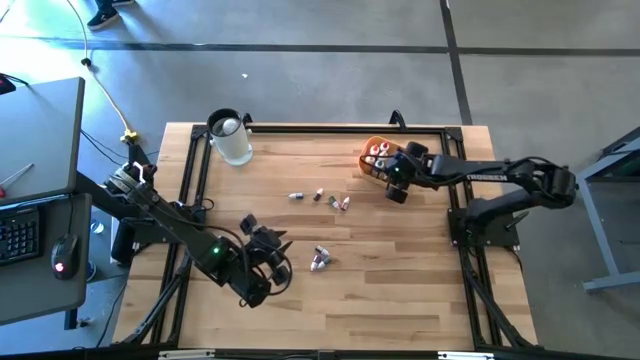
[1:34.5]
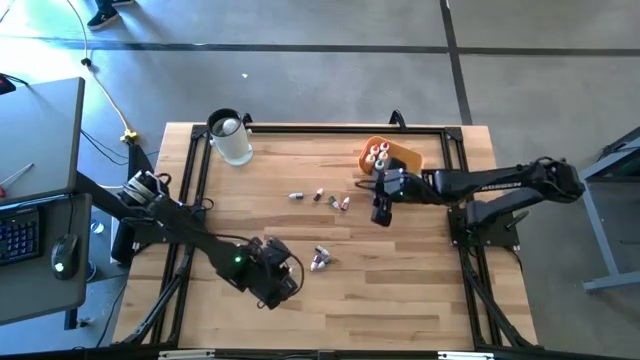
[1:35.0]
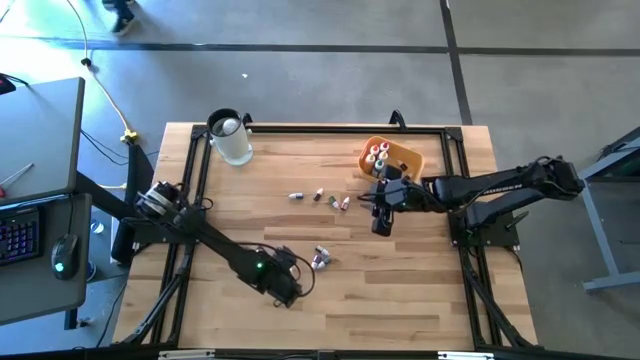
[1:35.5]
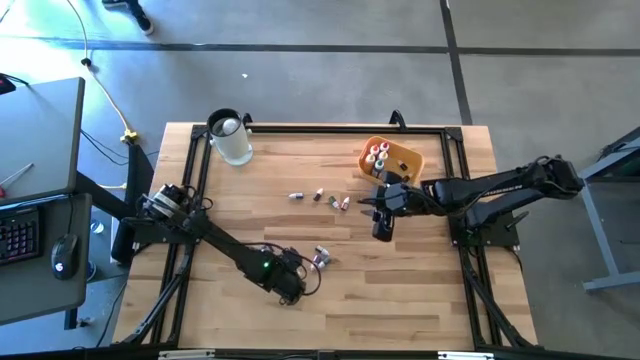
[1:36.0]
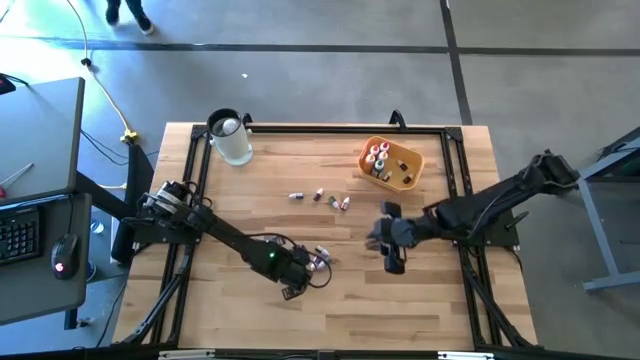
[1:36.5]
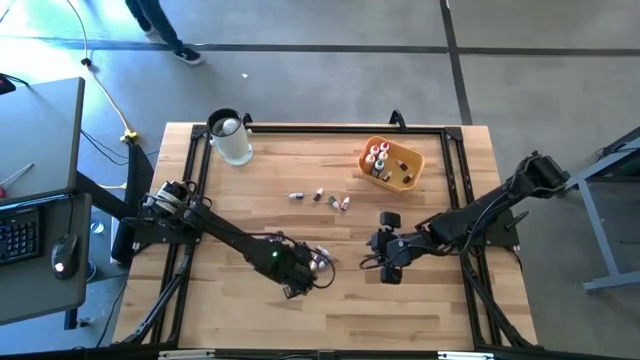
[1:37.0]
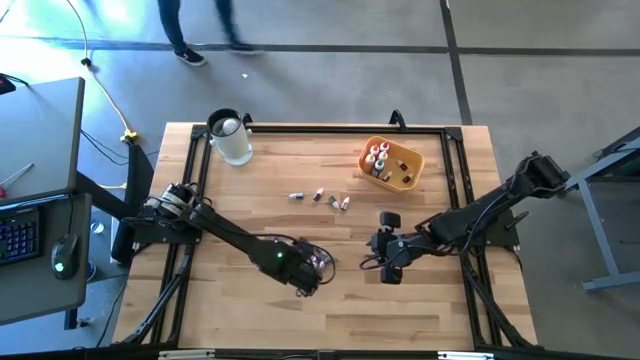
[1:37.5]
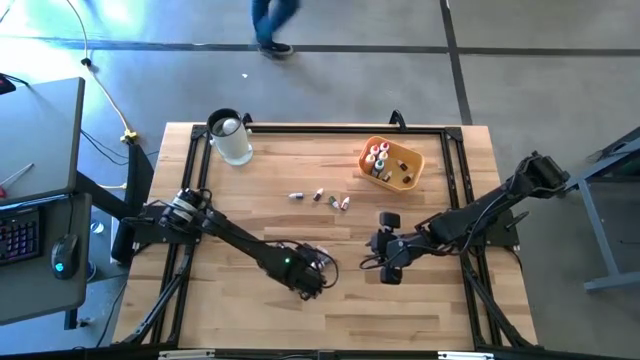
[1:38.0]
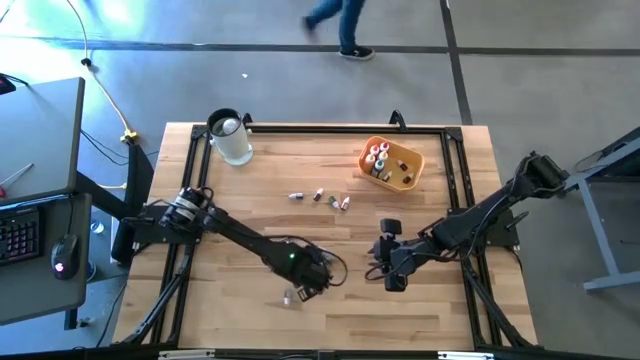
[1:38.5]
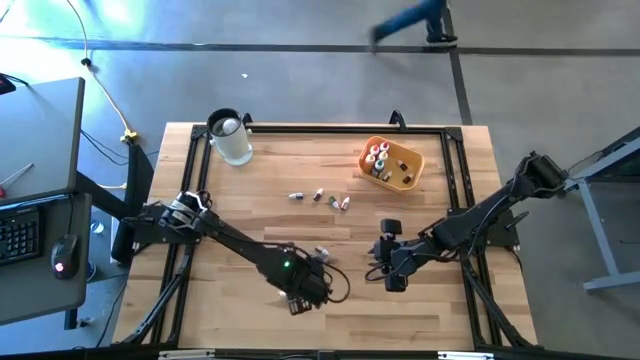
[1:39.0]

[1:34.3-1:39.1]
Task: Pick & Place food coloring
Put the small blue food coloring bottle into the yellow bin

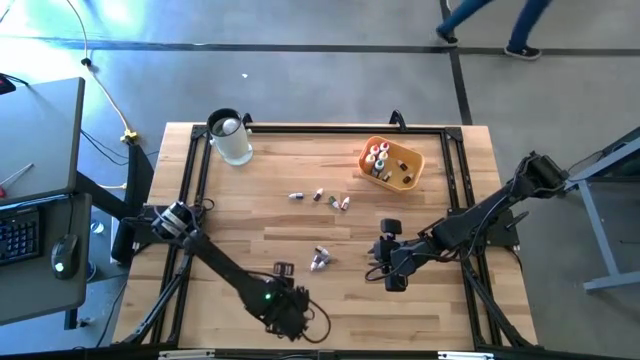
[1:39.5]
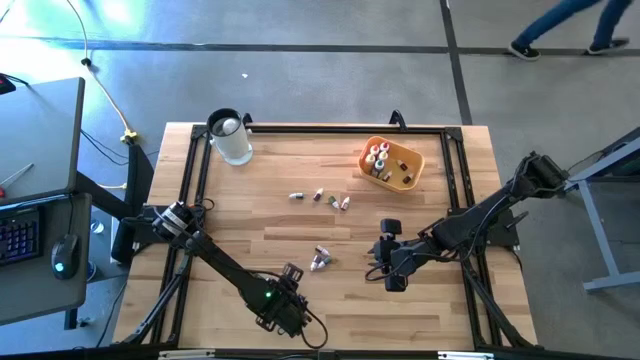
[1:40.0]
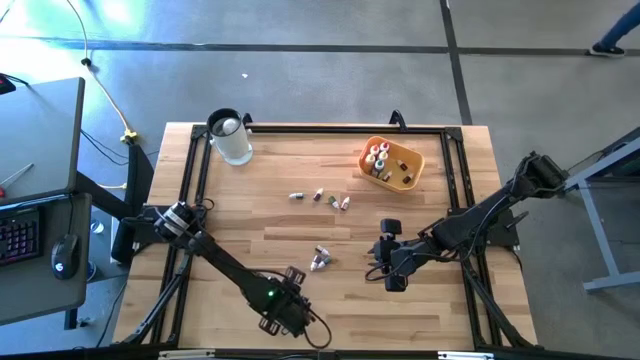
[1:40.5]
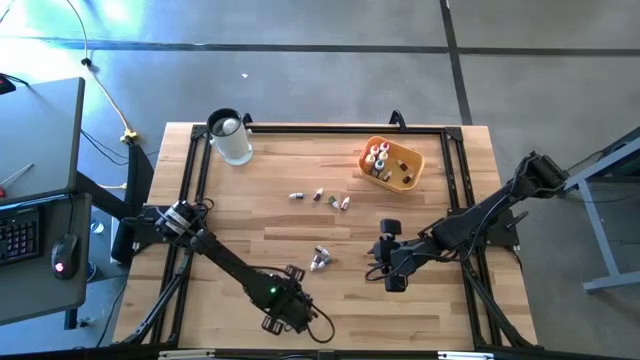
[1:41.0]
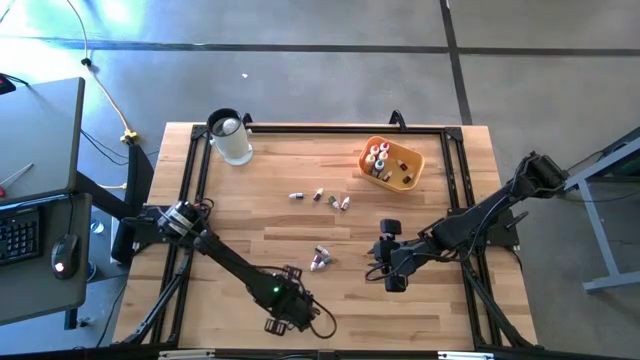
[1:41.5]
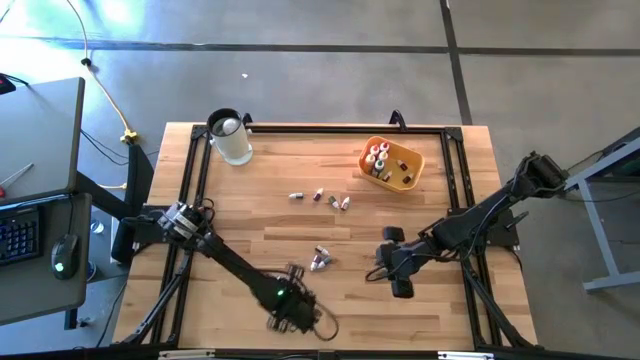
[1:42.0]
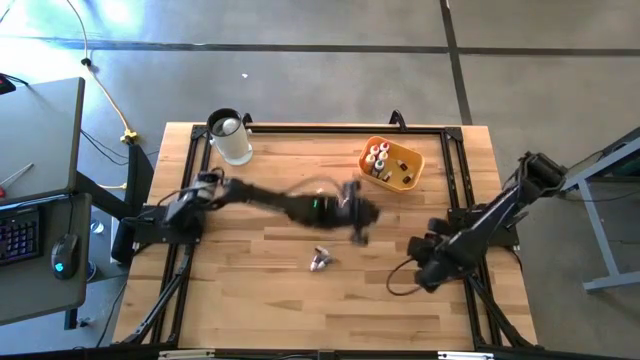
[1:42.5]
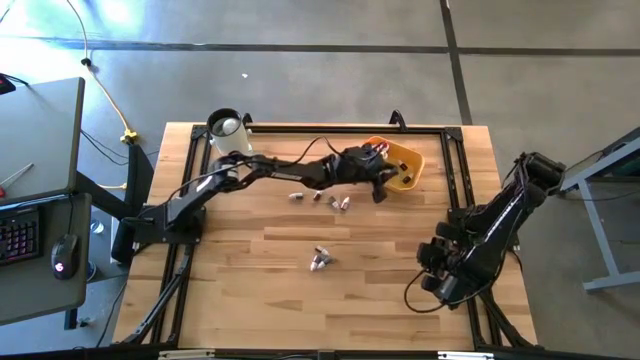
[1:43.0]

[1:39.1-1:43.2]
Put the small blue food coloring bottle into the yellow bin

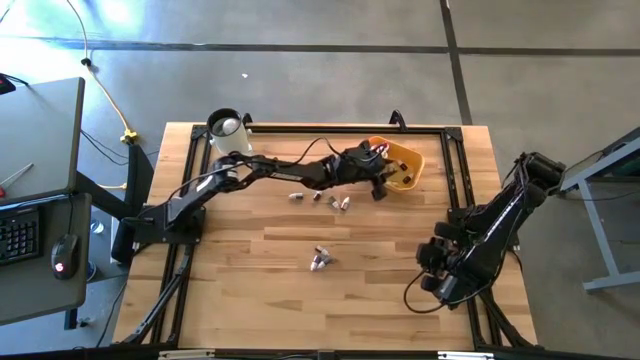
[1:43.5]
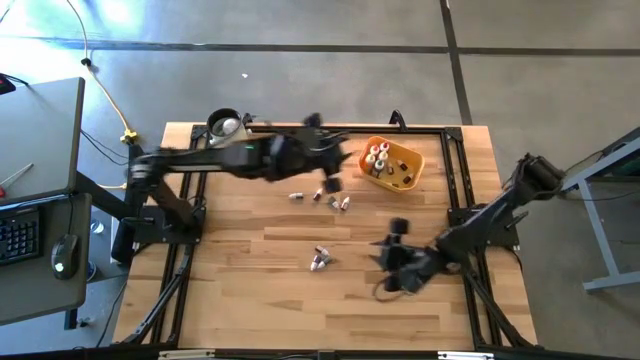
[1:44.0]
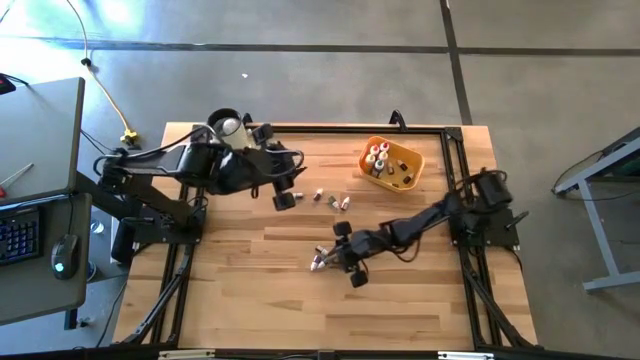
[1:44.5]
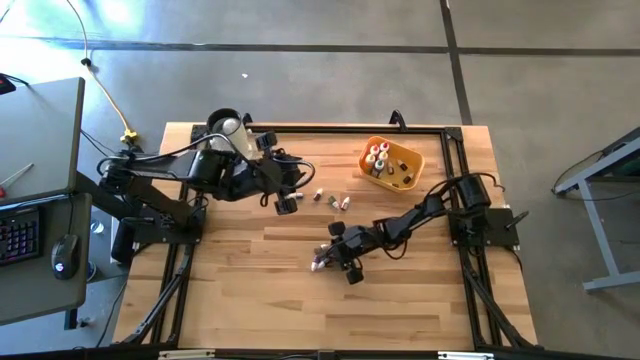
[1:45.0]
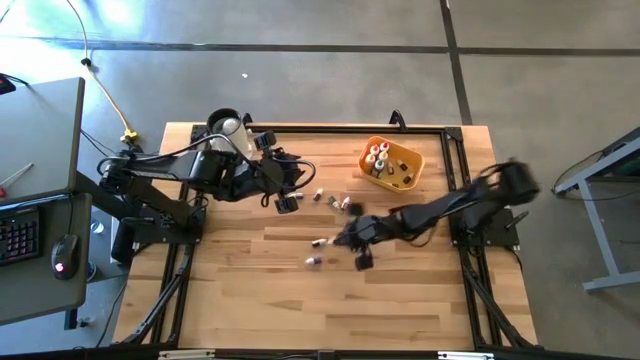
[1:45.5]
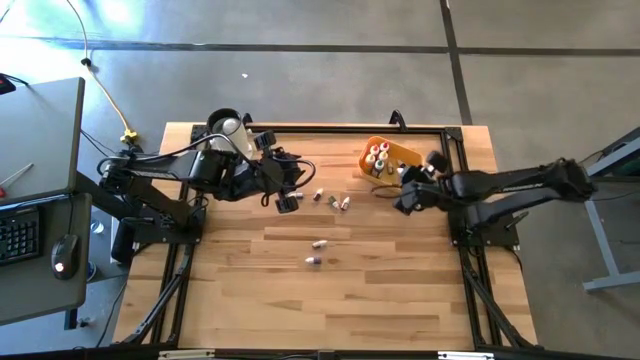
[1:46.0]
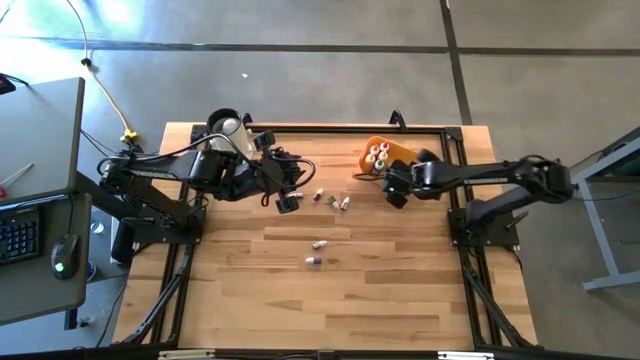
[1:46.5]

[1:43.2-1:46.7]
Put the small black food coloring bottle into the yellow bin

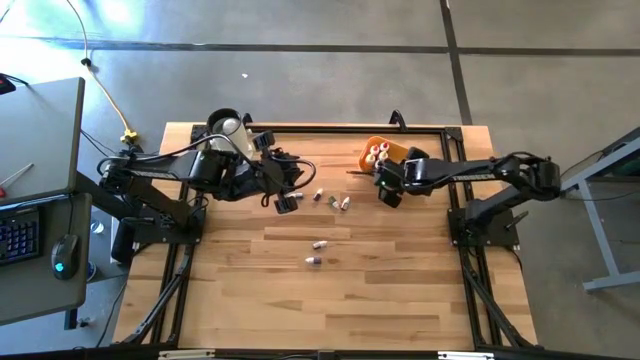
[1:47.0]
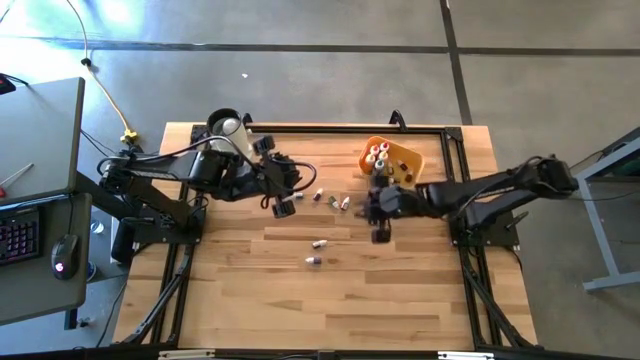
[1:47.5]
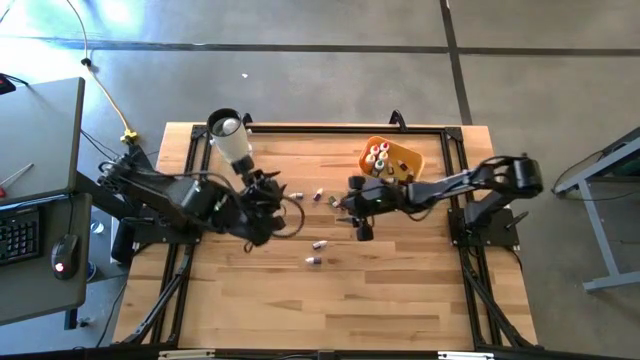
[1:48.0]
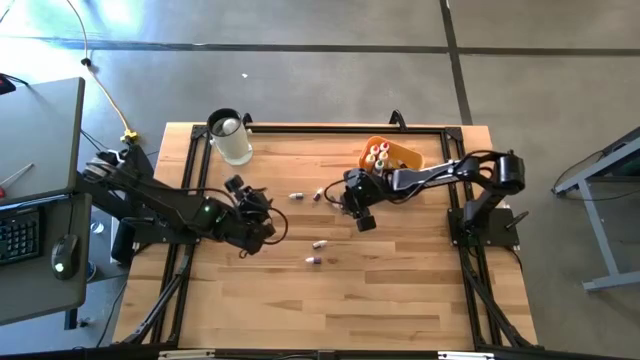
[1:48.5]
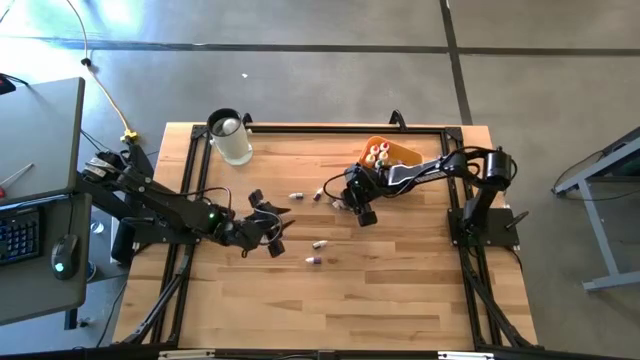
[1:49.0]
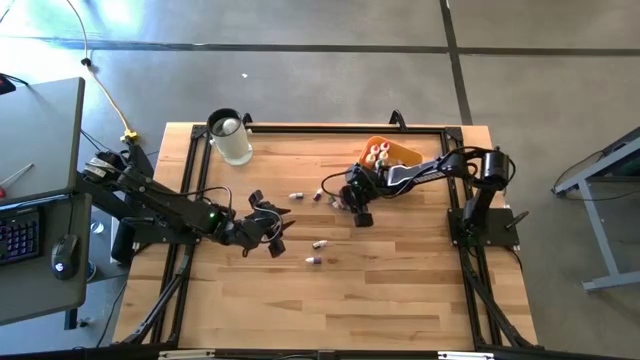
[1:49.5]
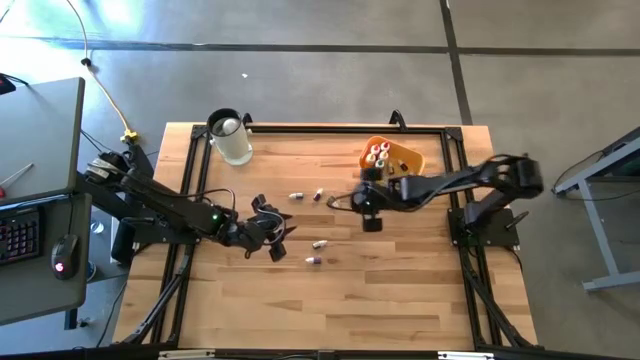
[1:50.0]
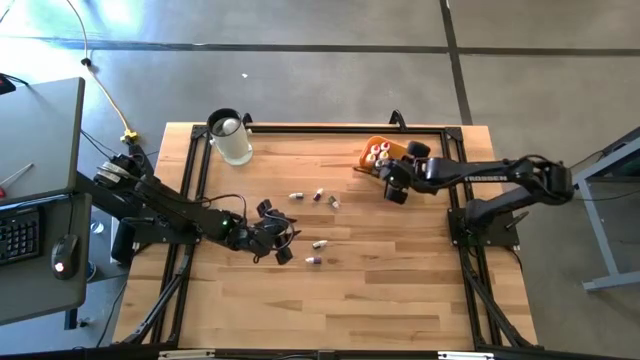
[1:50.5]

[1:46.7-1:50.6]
Put the right small red food coloring bottle into the yellow bin

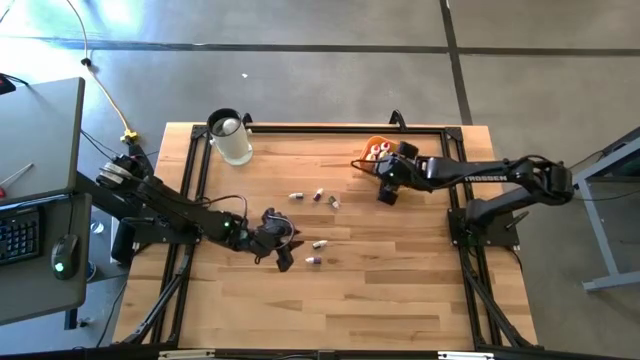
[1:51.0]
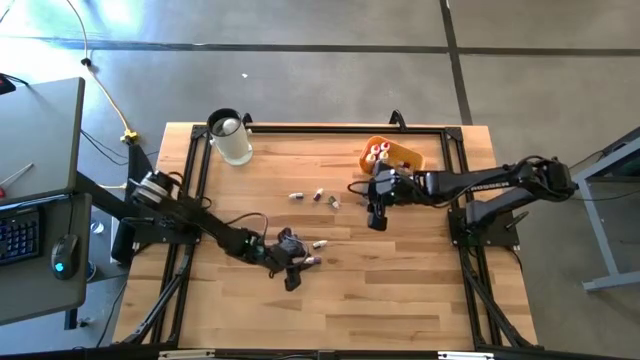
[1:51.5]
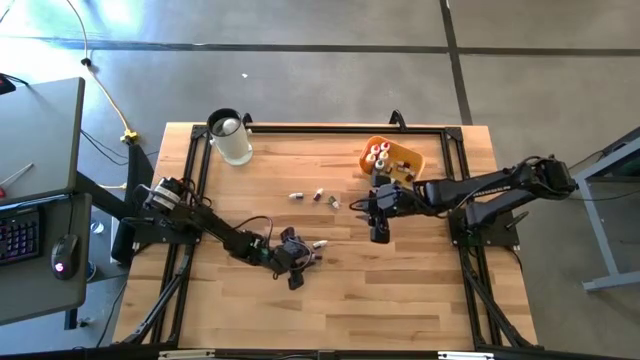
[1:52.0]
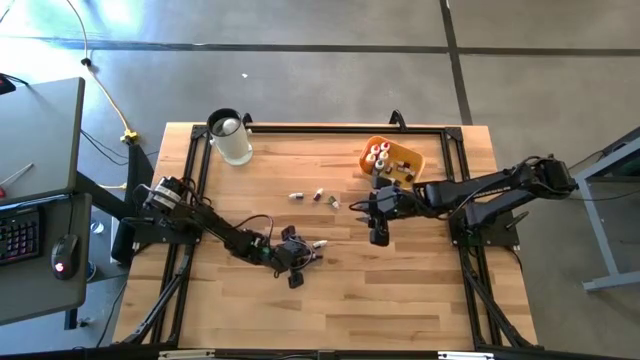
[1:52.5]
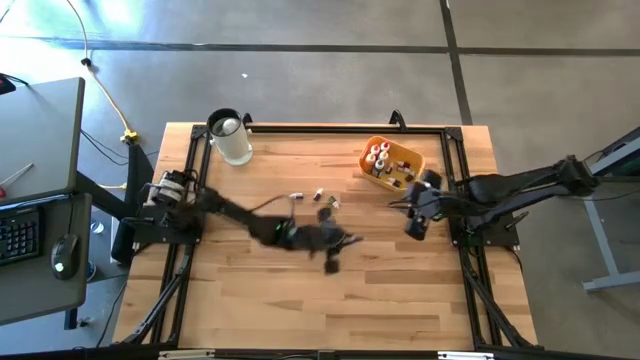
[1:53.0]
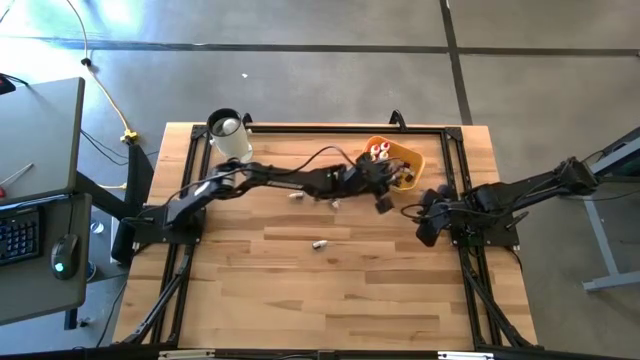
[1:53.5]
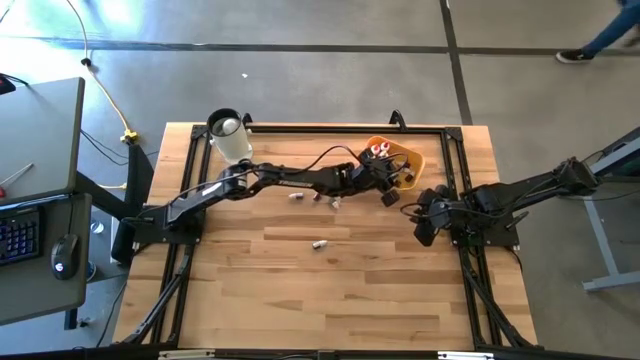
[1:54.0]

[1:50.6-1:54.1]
Put the small violet food coloring bottle into the yellow bin
